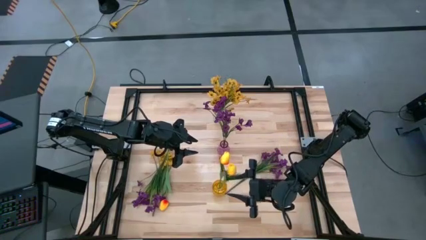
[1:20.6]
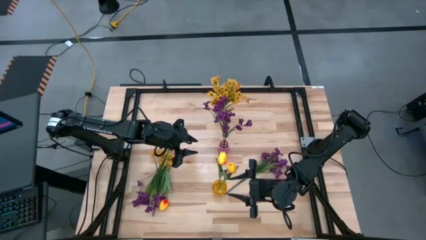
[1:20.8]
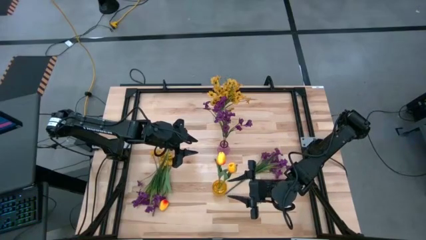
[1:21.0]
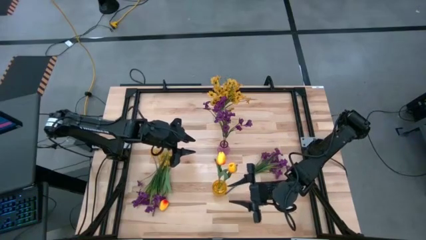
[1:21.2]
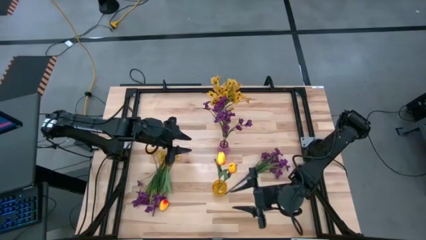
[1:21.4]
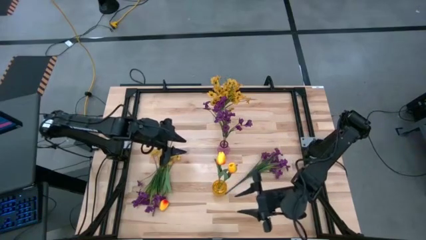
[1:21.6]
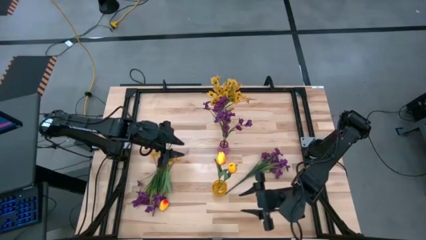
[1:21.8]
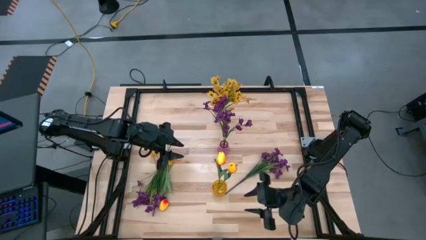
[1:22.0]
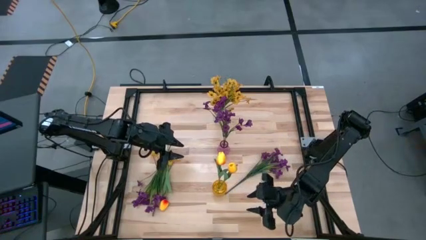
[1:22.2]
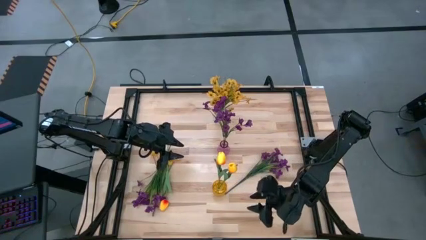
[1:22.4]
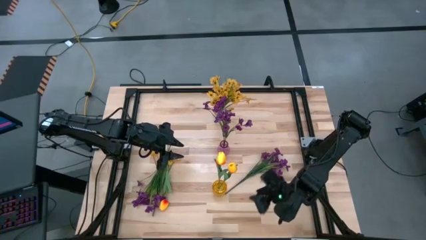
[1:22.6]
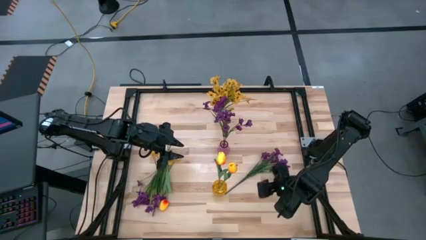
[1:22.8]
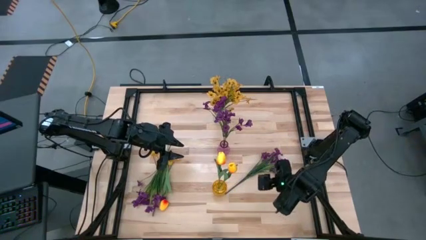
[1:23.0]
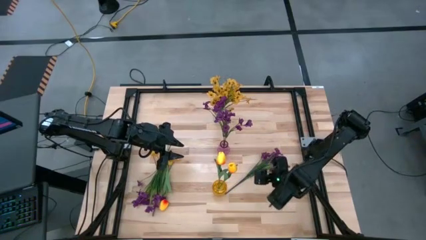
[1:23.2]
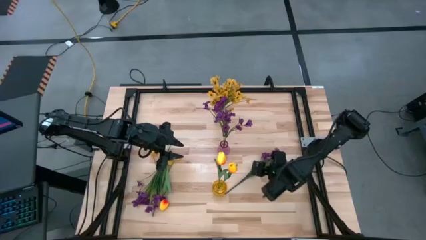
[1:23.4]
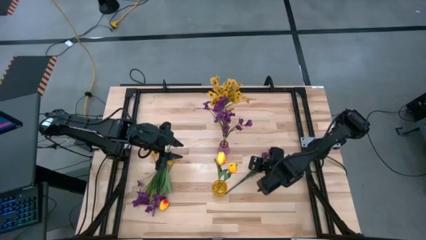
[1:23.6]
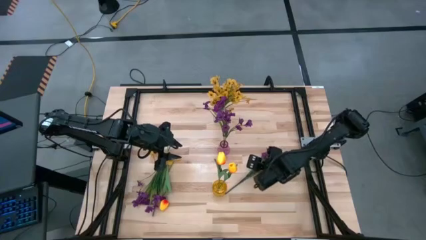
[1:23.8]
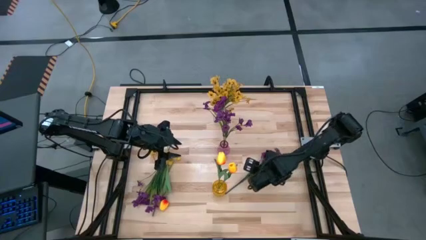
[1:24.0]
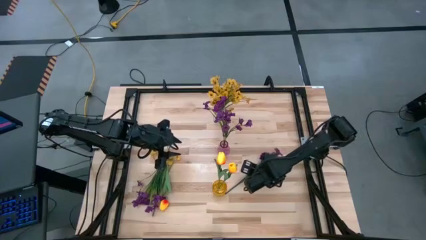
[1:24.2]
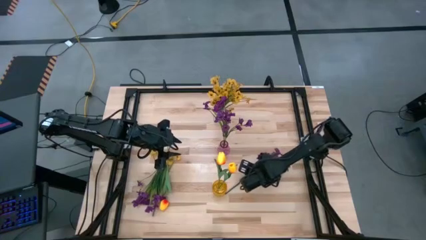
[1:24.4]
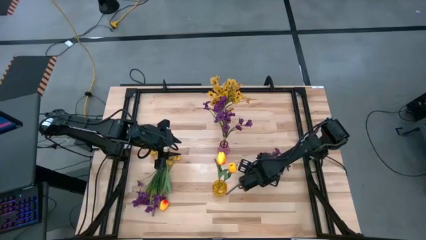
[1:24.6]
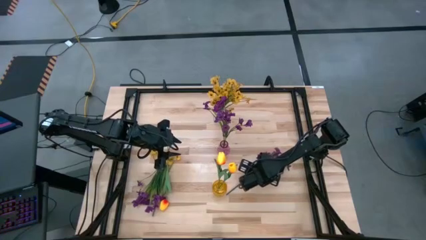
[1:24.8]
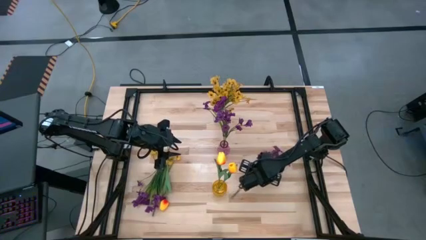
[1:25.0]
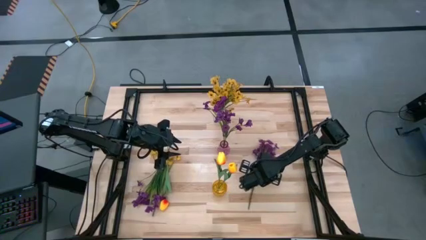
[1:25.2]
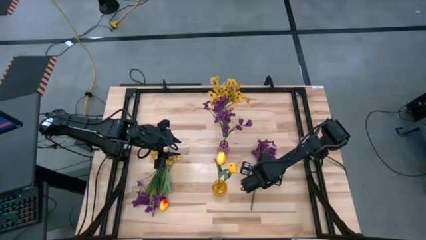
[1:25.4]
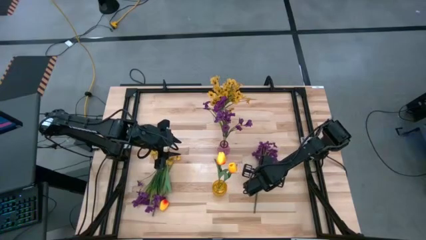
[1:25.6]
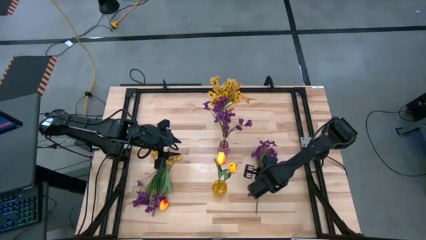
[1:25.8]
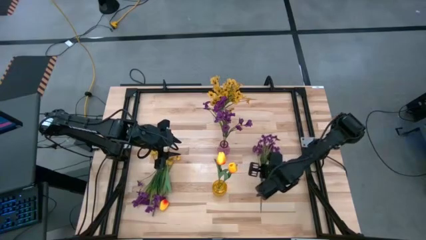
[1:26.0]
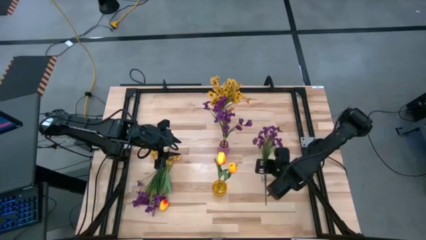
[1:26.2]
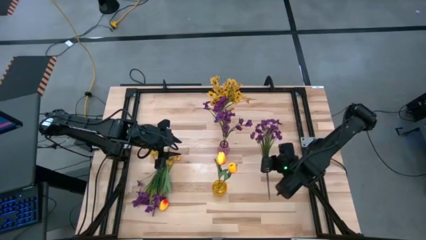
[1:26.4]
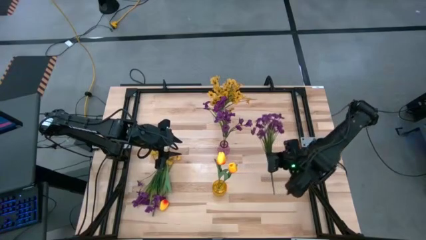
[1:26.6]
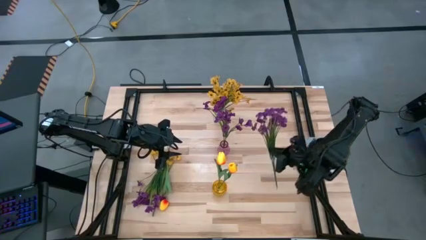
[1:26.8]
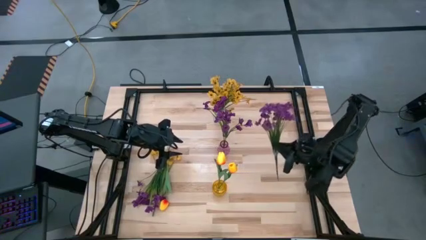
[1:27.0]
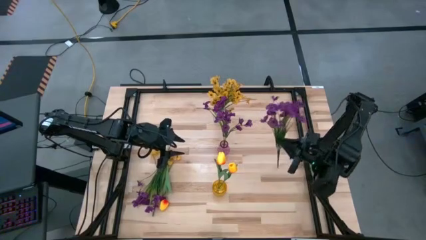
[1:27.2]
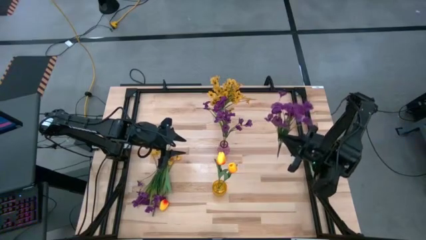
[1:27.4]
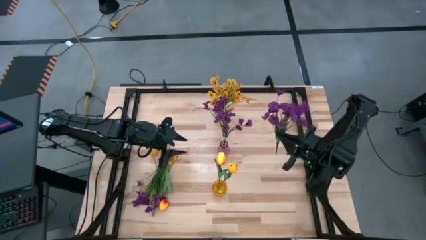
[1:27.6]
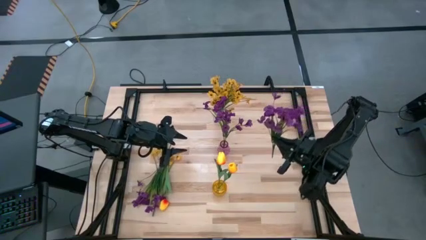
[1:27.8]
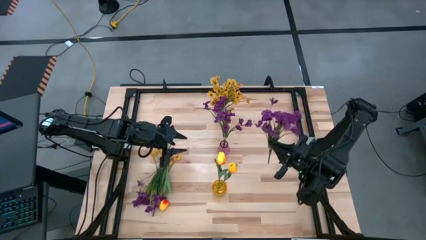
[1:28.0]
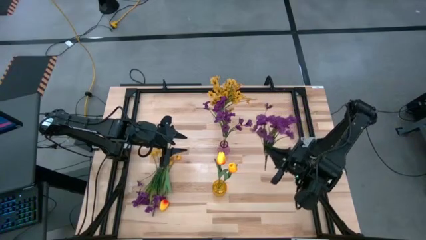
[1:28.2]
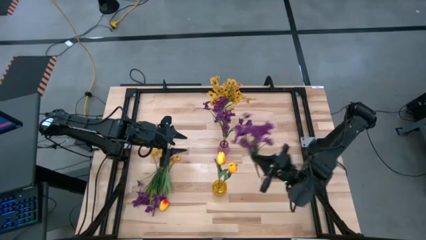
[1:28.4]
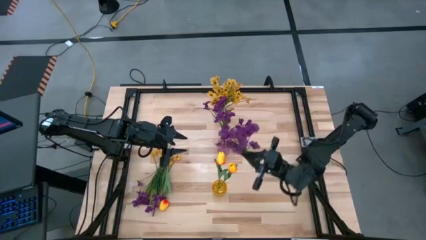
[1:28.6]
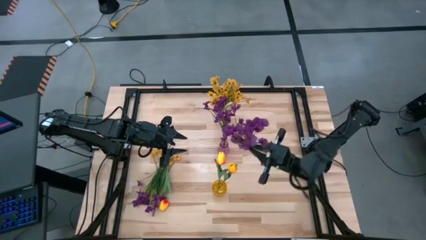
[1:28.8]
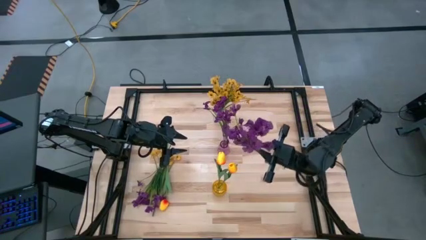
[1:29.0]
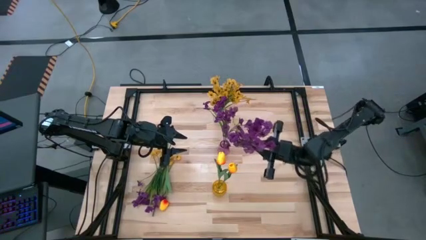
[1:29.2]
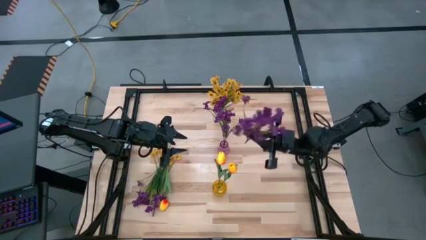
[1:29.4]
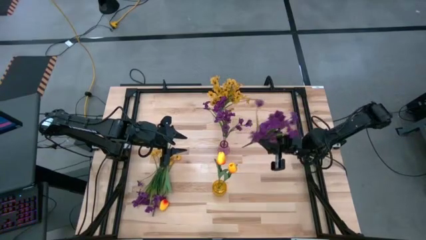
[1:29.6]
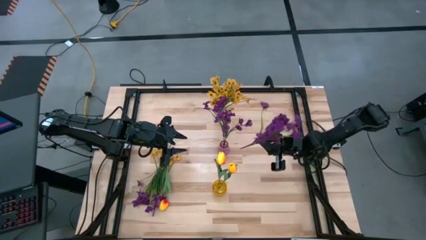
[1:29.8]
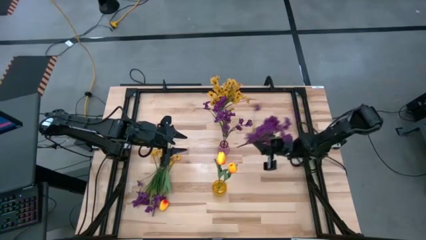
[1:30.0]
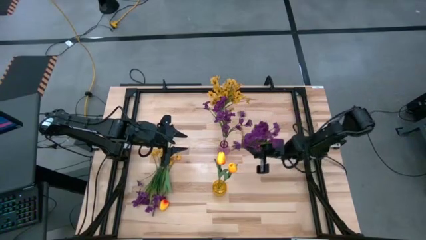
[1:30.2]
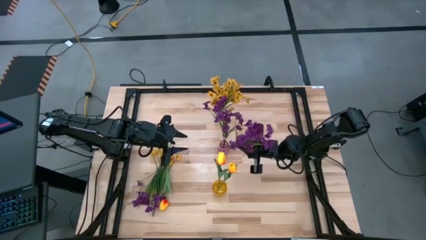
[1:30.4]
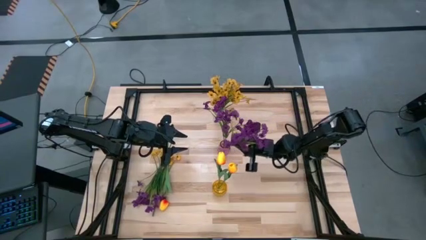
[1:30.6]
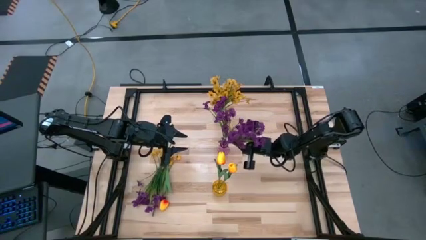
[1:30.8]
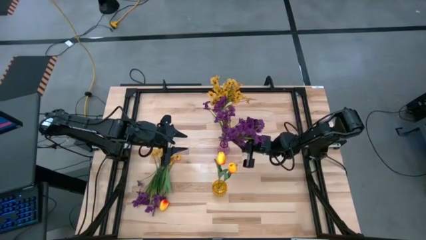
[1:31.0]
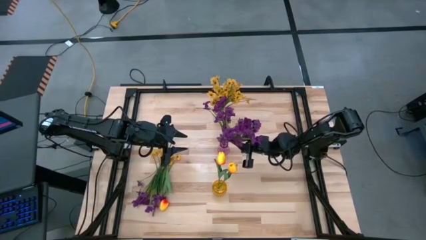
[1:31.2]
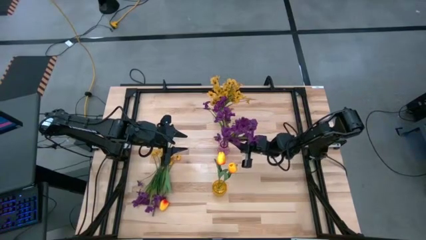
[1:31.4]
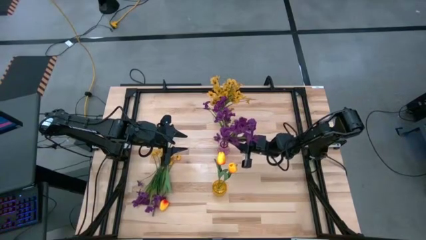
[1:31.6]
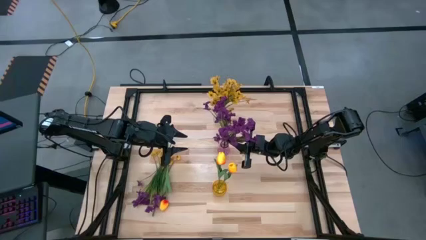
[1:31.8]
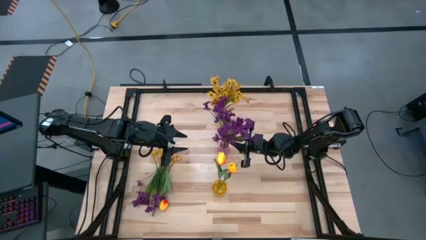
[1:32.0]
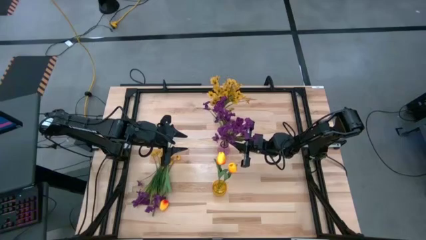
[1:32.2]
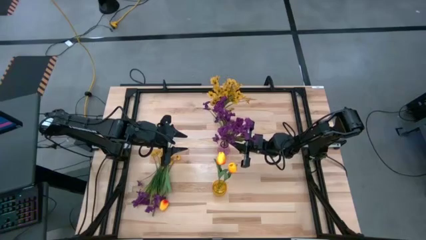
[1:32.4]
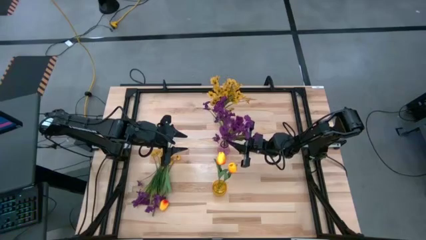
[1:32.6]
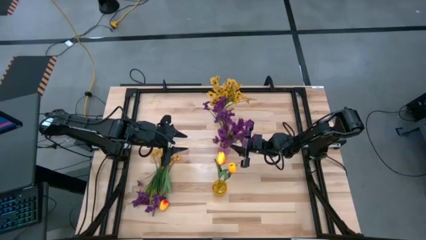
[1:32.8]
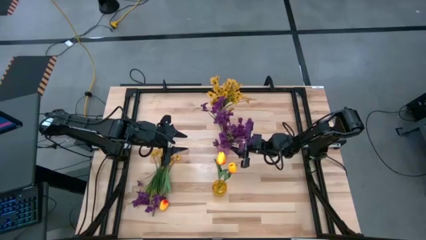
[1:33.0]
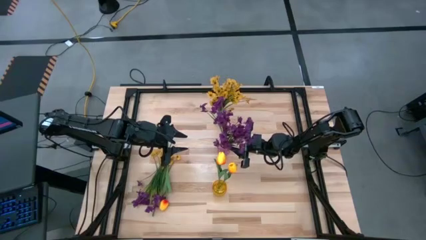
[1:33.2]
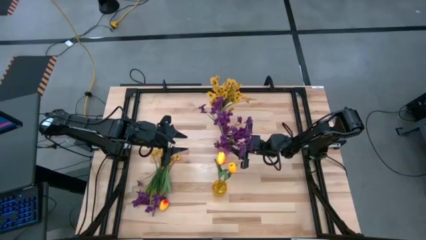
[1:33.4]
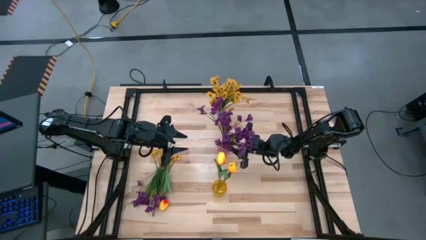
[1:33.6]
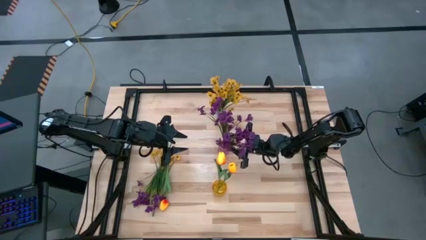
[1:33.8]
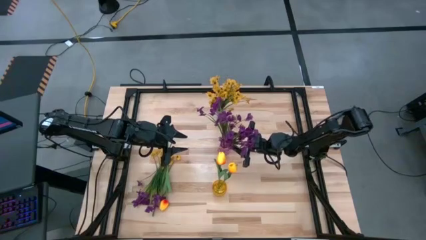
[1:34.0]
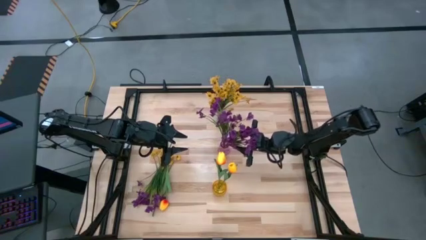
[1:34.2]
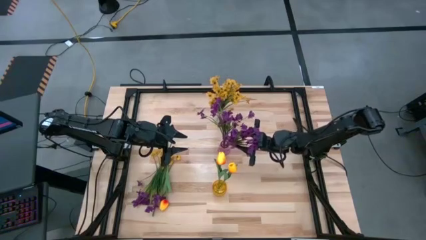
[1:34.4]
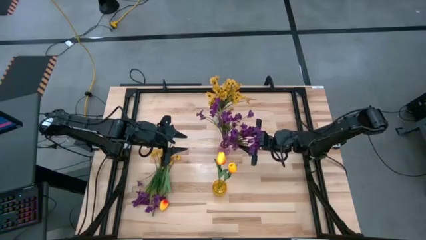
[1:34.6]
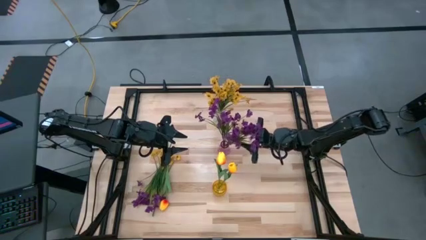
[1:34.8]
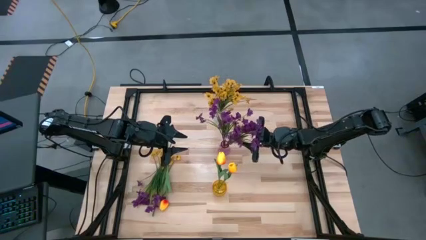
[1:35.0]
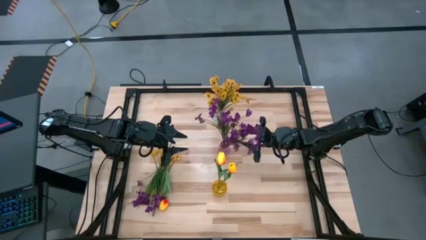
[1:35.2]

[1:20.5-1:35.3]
Task: Sort flowers into vase by color
Put the right violet flowers into the violet vase
